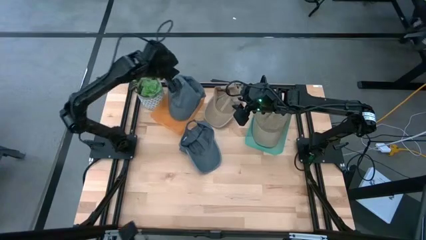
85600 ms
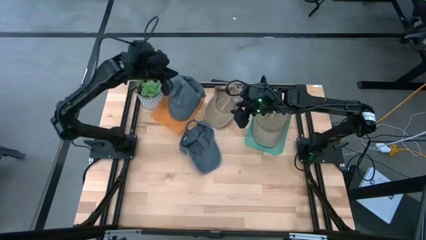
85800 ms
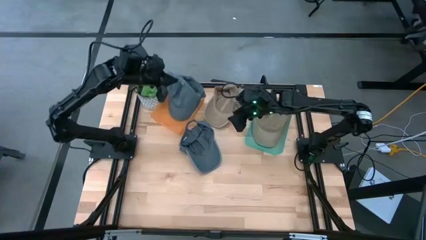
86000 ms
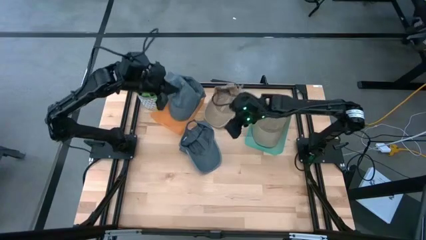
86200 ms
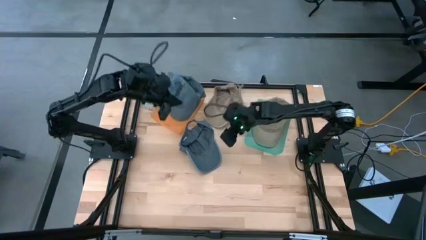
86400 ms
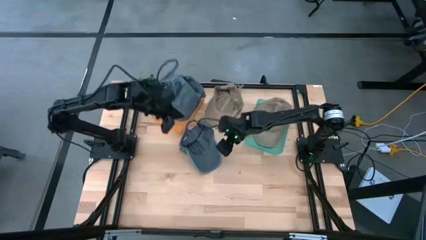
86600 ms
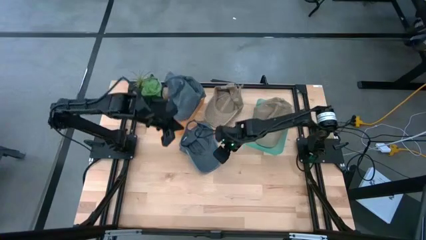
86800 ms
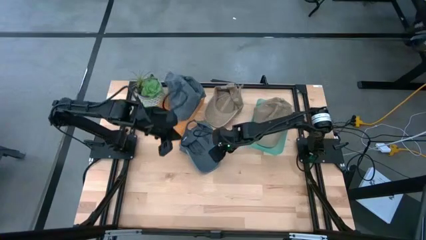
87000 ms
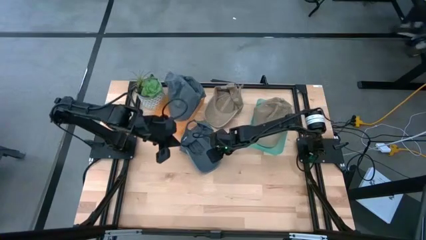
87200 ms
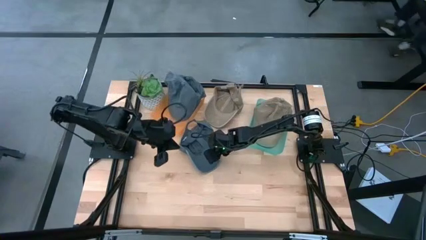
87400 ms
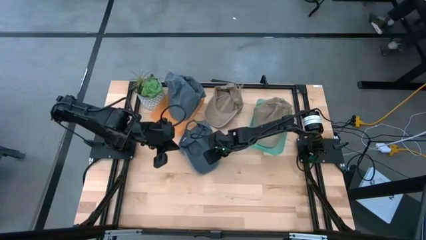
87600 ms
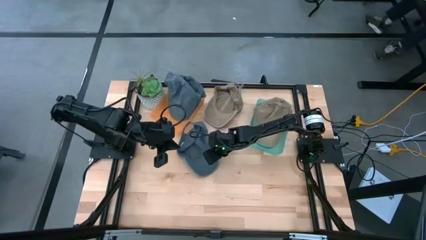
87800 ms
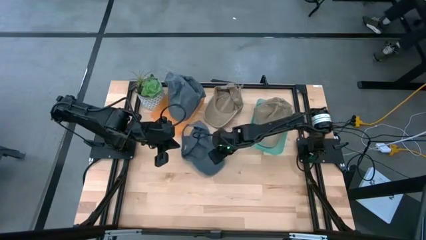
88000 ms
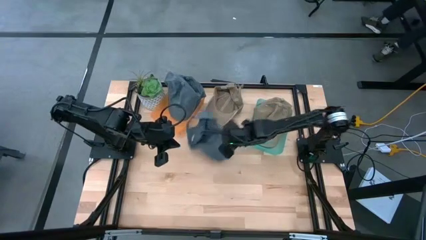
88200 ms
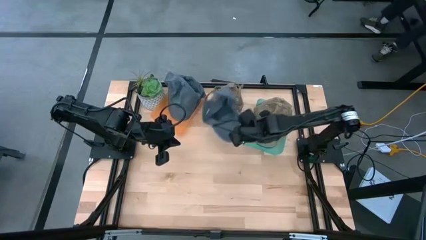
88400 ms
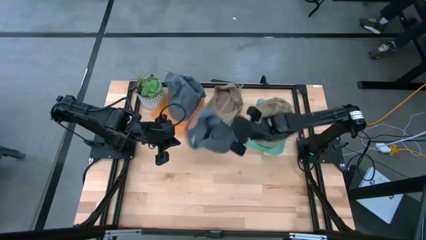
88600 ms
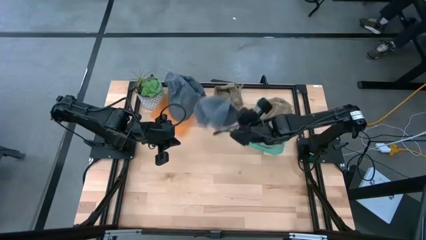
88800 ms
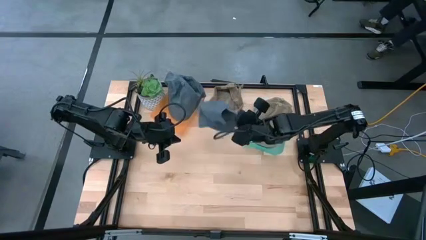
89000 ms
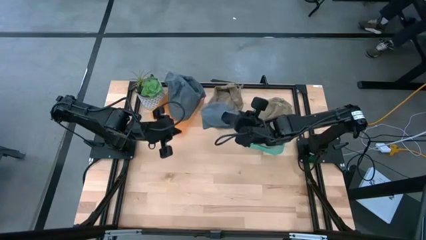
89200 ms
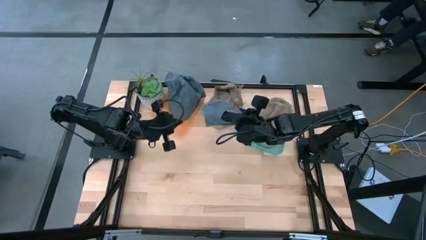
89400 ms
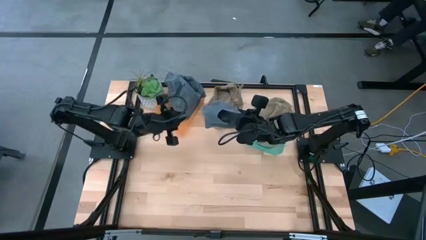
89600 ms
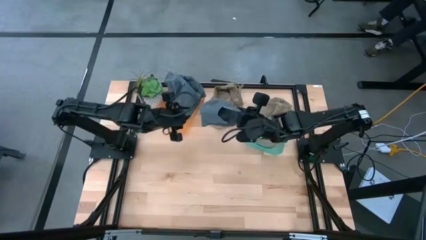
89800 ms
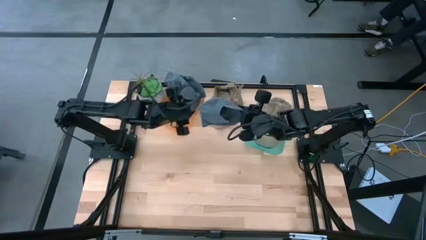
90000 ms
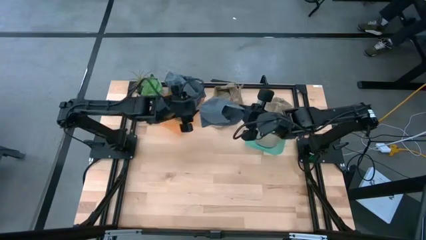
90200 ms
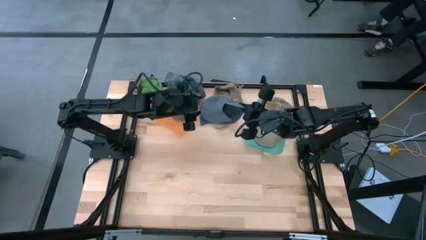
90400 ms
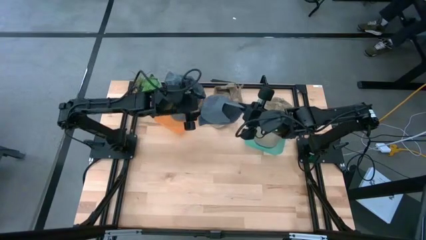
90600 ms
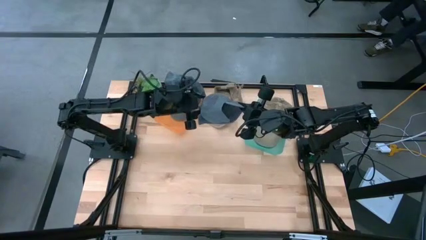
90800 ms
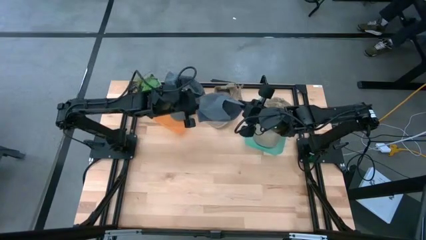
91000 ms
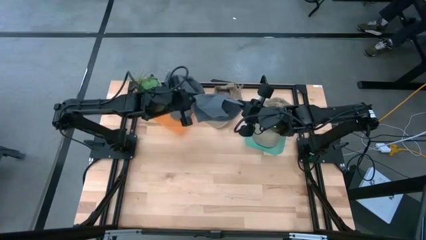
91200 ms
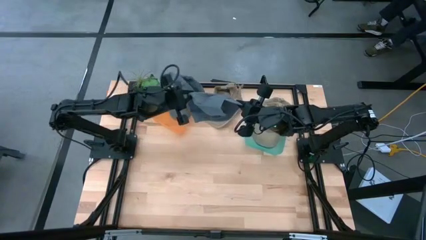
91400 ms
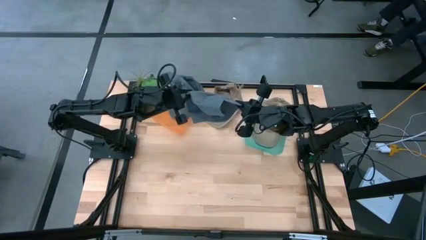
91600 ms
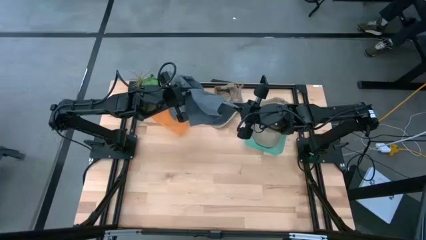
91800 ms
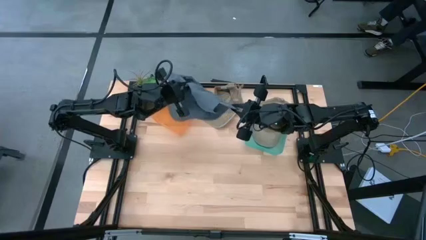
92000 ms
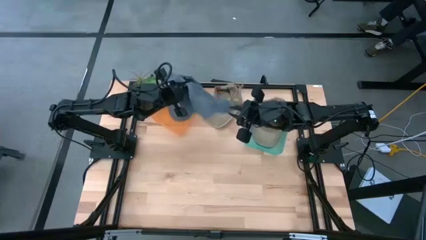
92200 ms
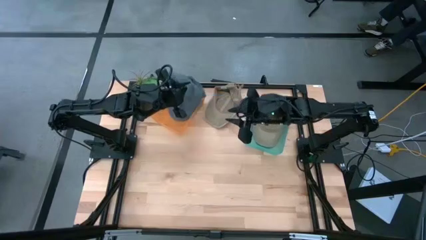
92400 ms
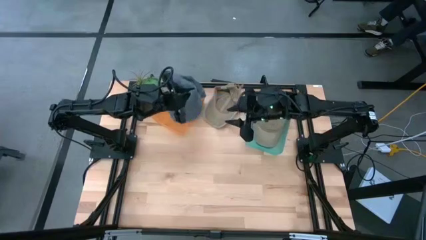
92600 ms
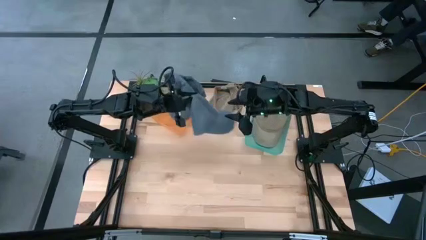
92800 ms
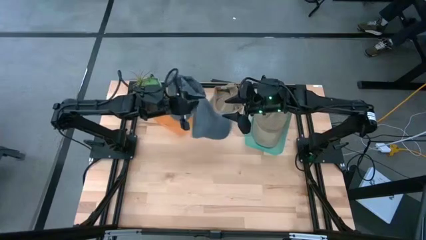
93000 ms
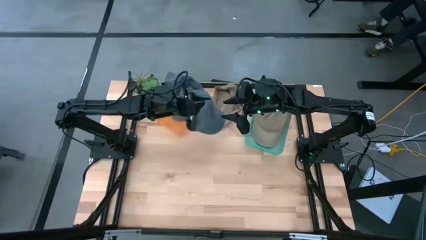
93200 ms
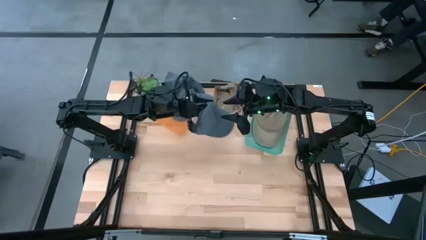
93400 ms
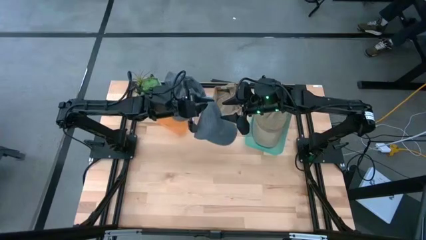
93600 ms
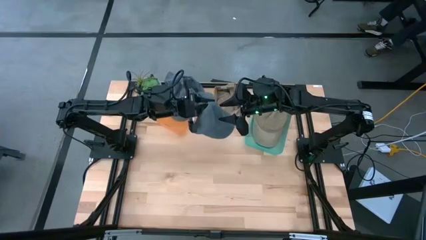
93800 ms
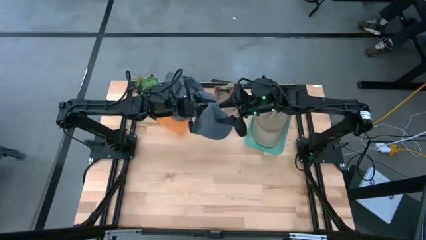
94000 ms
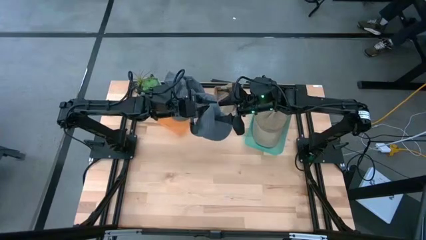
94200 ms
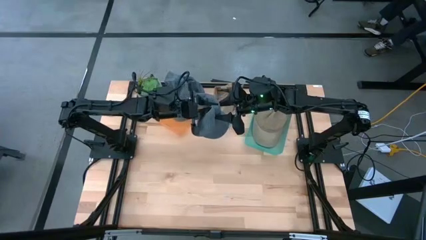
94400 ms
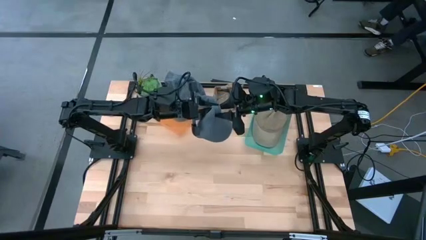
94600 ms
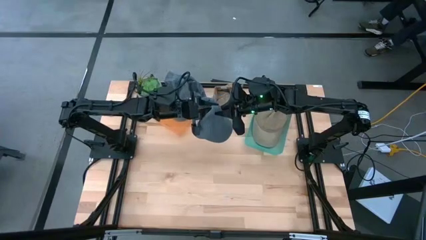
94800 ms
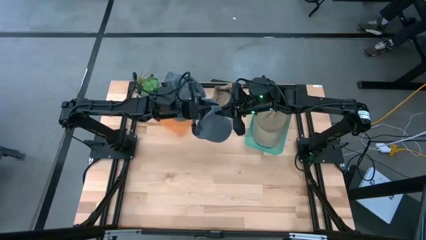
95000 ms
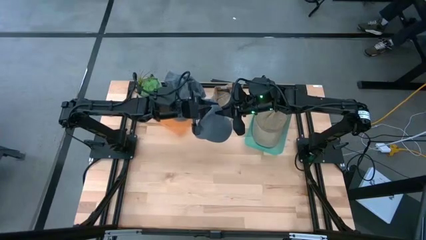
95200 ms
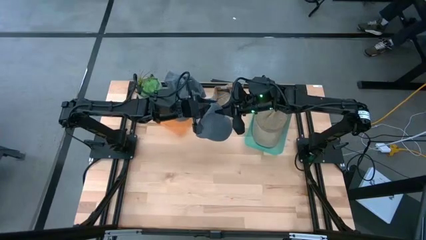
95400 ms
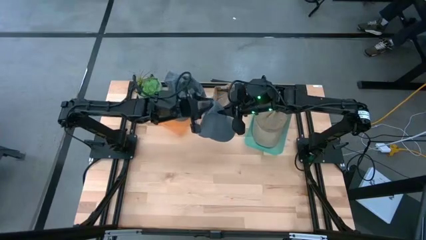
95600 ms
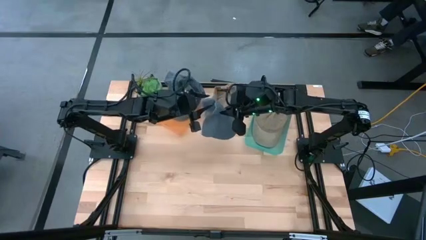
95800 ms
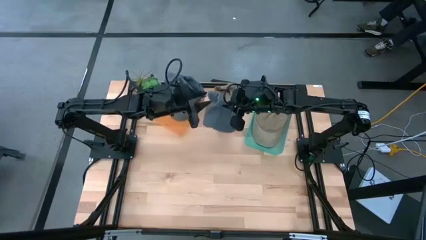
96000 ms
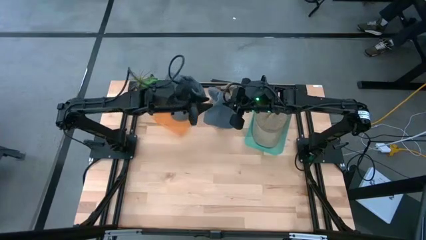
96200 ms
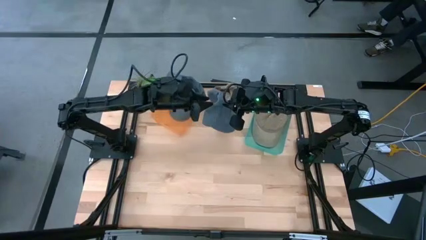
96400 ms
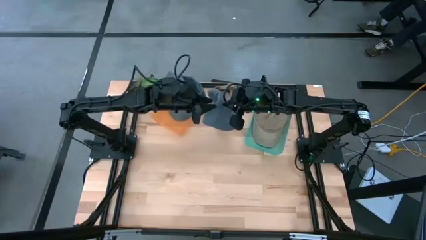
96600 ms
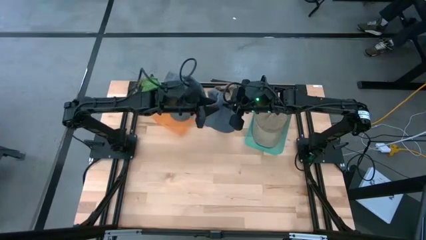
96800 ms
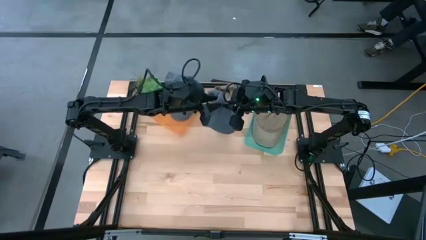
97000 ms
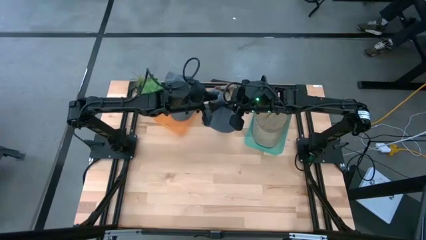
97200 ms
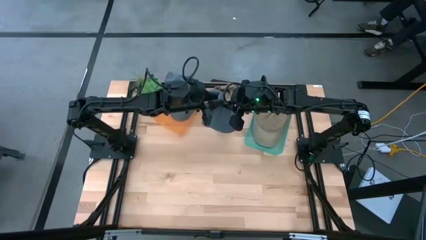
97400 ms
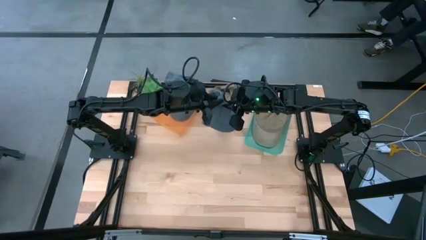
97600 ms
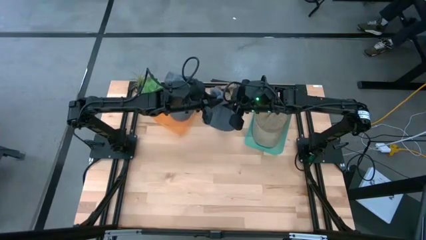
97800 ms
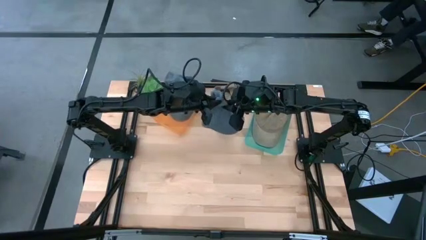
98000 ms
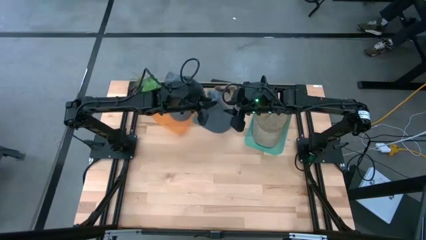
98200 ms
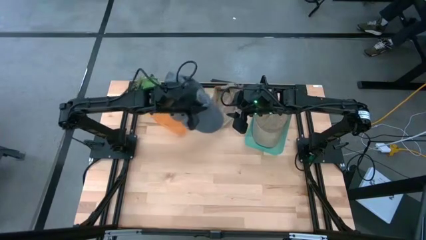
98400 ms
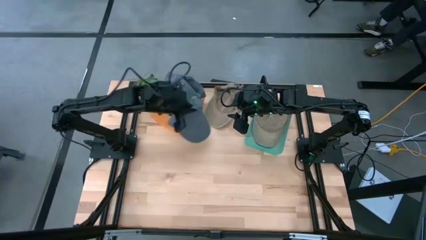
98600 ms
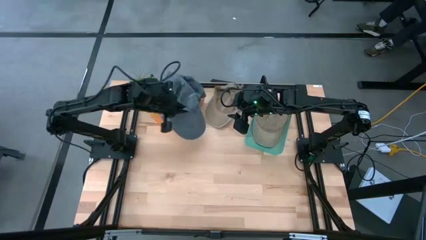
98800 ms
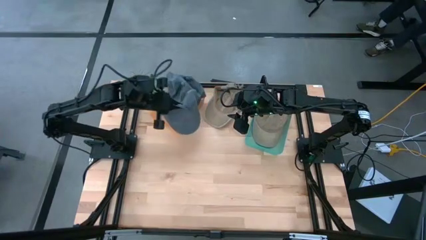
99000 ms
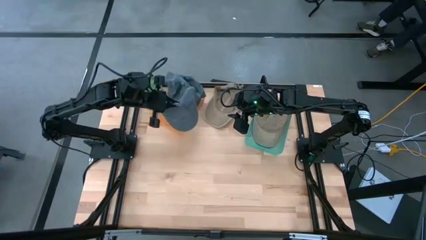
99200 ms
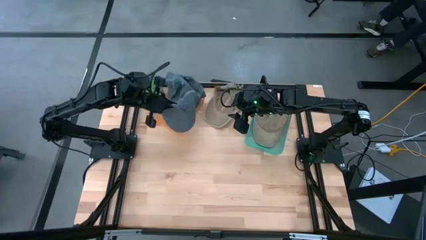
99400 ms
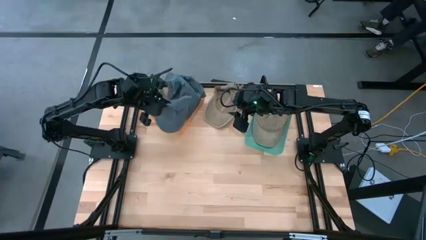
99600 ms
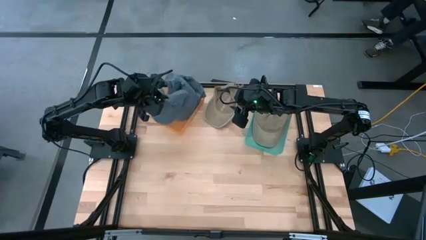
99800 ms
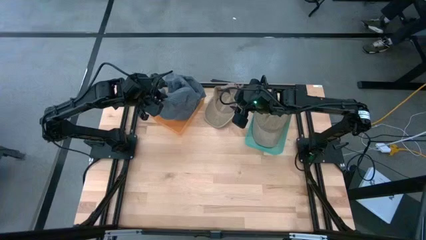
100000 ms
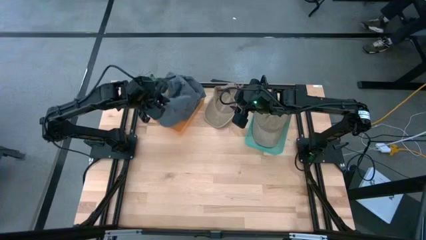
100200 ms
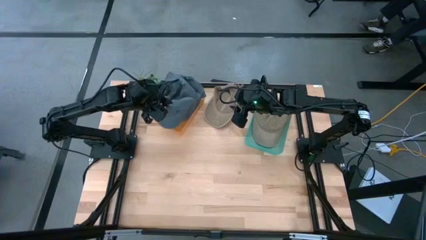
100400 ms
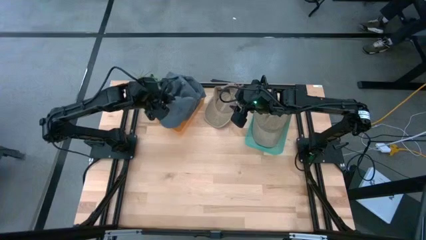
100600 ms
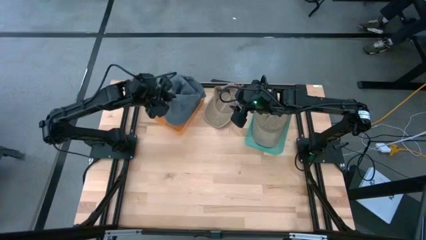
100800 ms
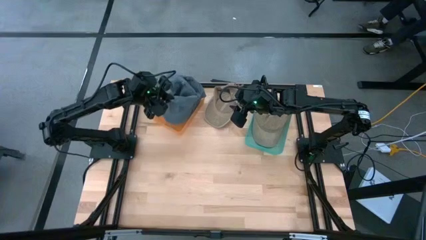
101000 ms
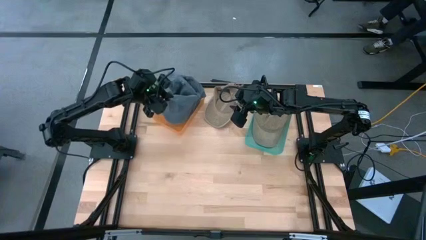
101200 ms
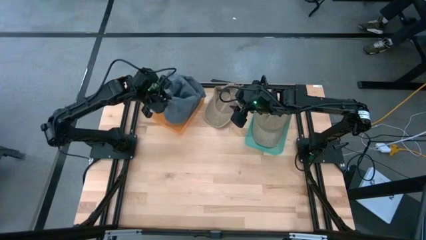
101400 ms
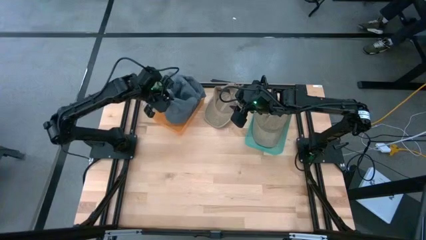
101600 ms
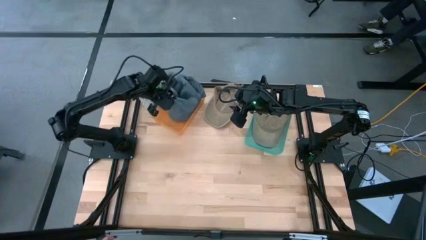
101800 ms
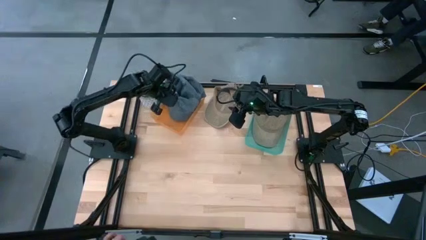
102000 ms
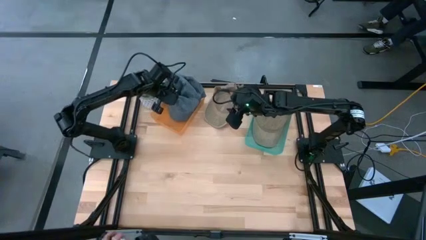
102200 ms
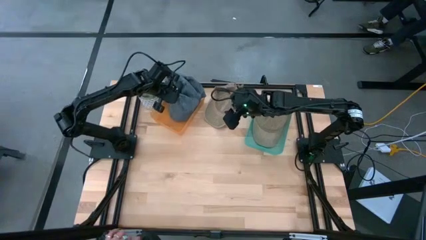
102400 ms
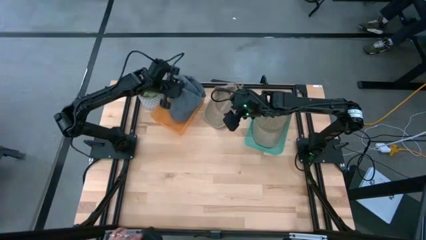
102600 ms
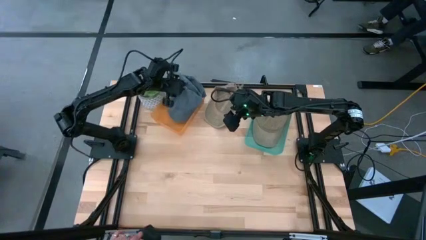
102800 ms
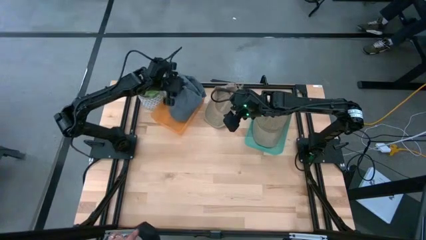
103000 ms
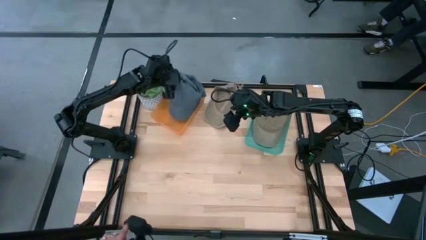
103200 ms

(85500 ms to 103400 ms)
Task: Pick & Place hat
Put the gray cap into the orange bin
